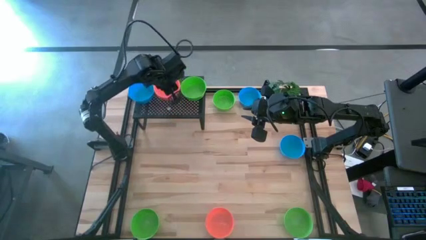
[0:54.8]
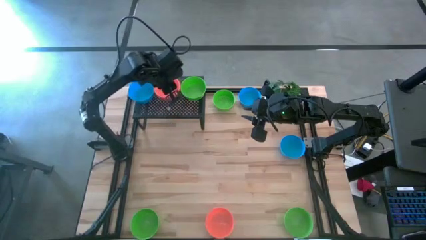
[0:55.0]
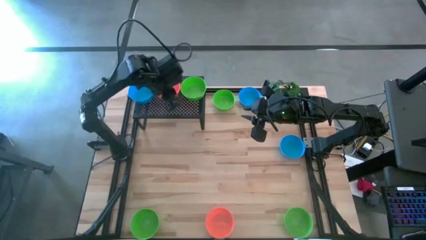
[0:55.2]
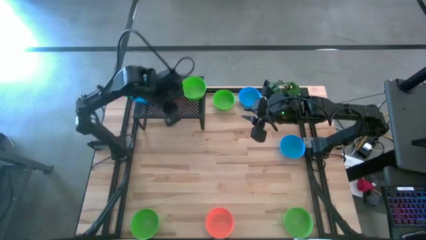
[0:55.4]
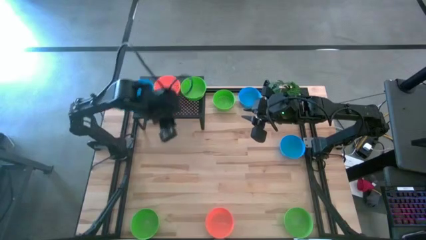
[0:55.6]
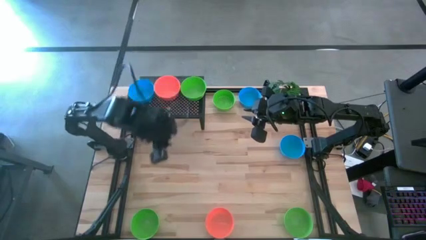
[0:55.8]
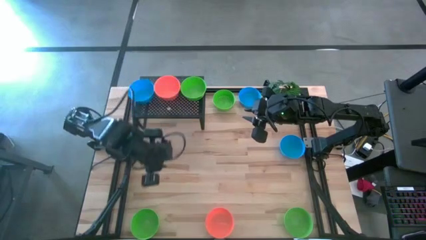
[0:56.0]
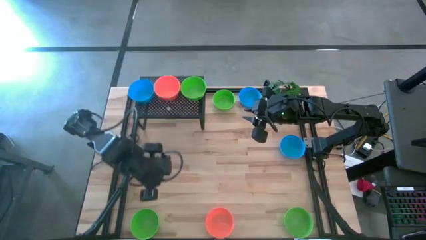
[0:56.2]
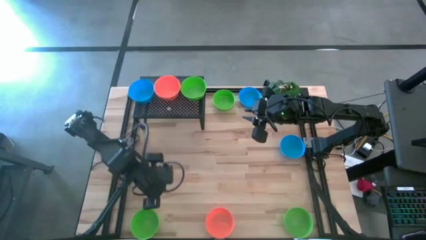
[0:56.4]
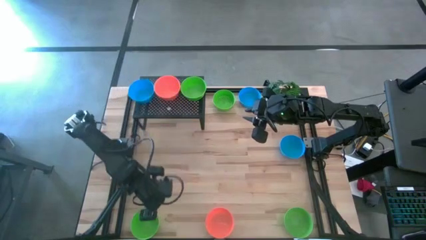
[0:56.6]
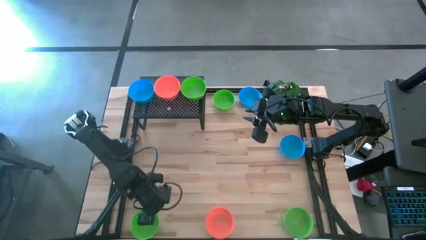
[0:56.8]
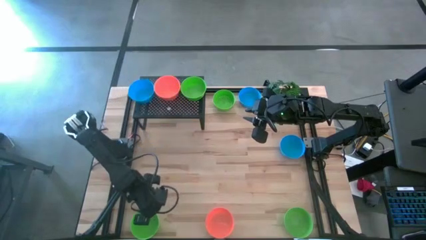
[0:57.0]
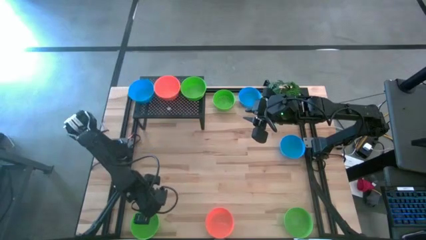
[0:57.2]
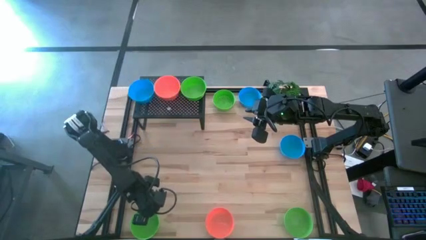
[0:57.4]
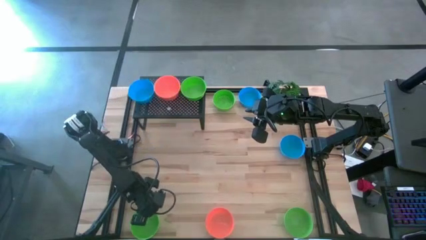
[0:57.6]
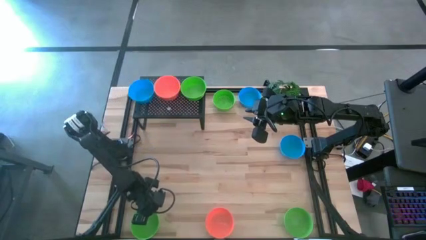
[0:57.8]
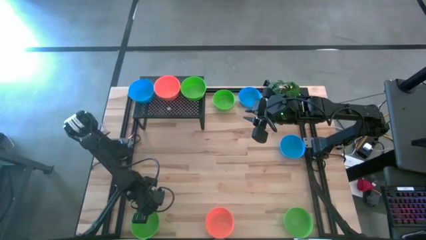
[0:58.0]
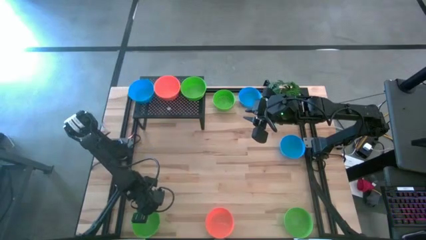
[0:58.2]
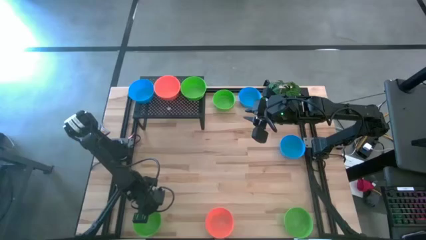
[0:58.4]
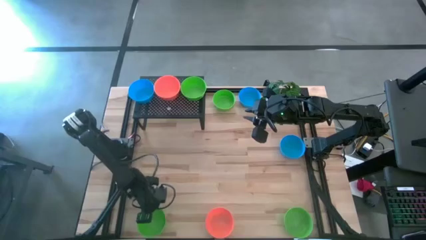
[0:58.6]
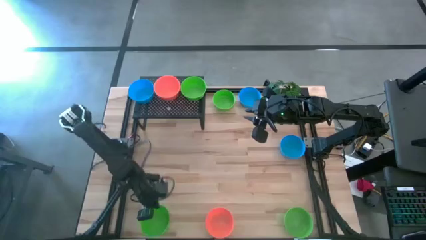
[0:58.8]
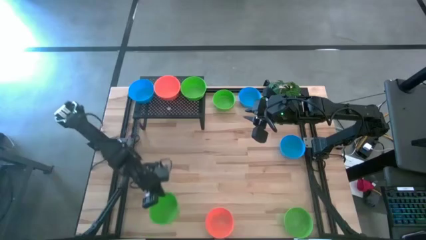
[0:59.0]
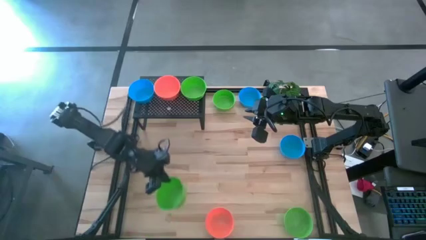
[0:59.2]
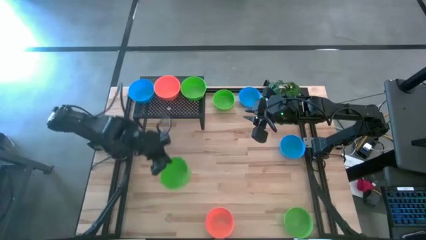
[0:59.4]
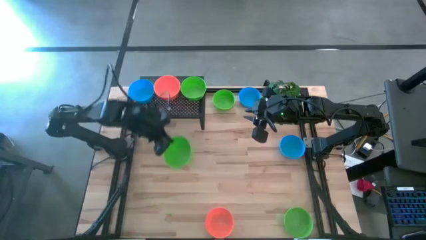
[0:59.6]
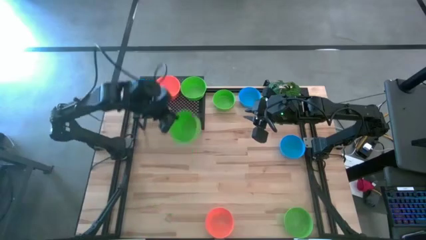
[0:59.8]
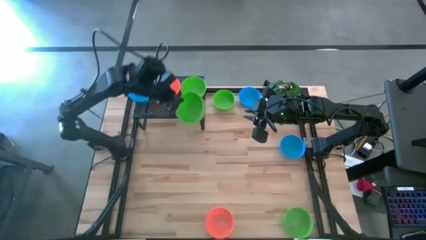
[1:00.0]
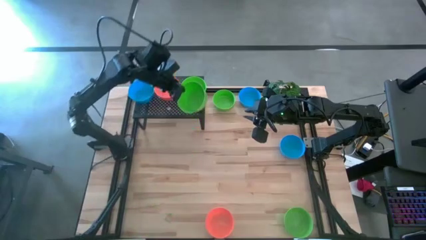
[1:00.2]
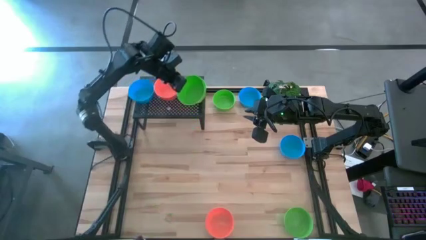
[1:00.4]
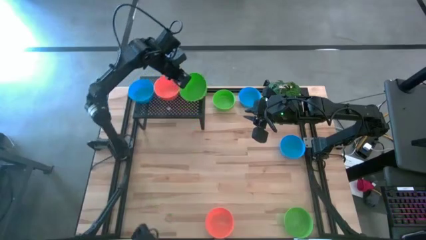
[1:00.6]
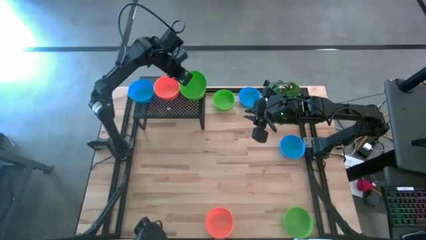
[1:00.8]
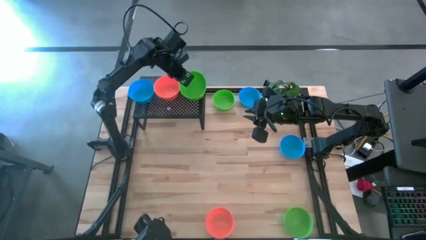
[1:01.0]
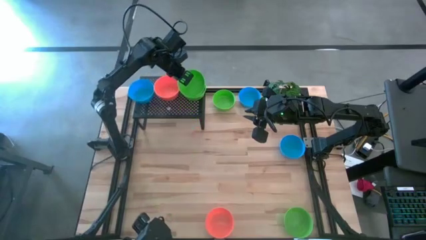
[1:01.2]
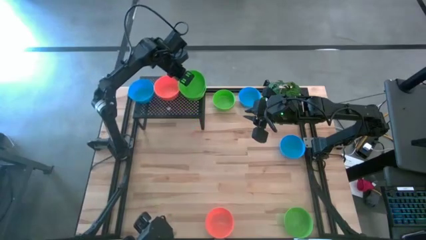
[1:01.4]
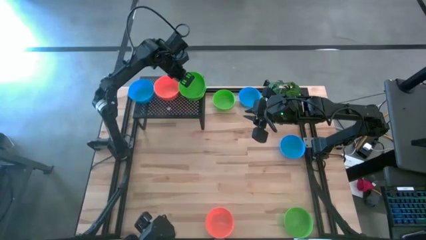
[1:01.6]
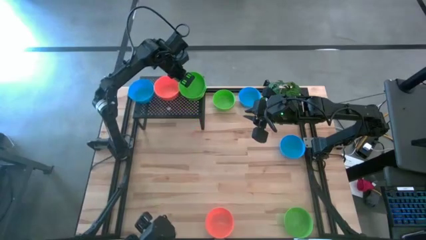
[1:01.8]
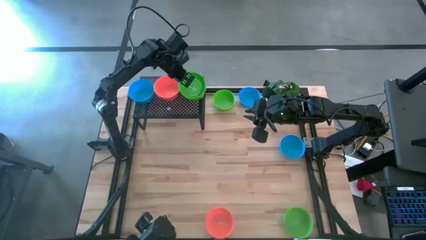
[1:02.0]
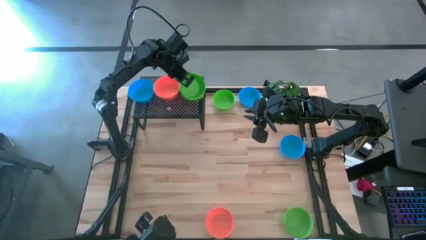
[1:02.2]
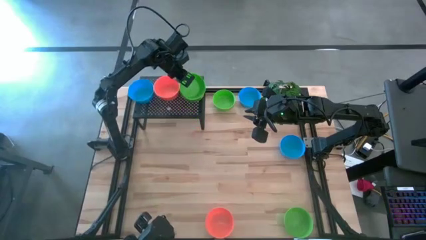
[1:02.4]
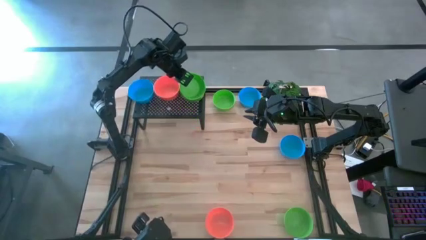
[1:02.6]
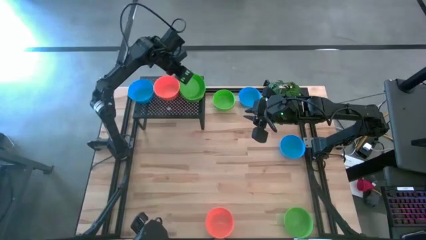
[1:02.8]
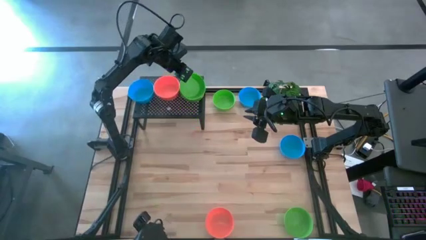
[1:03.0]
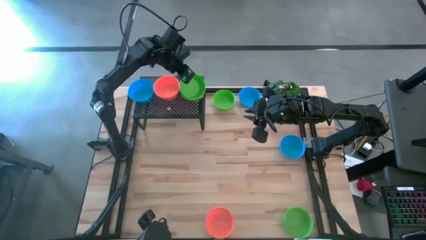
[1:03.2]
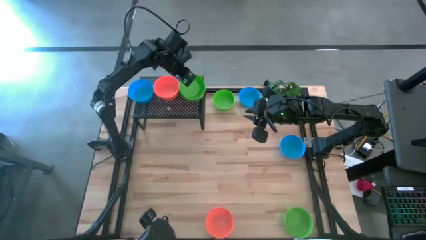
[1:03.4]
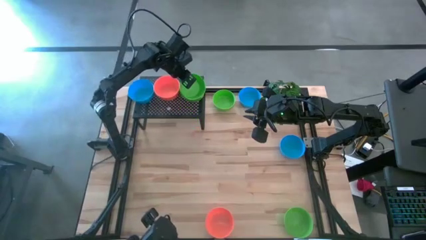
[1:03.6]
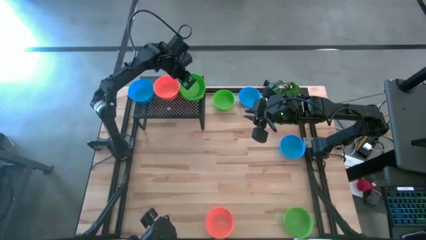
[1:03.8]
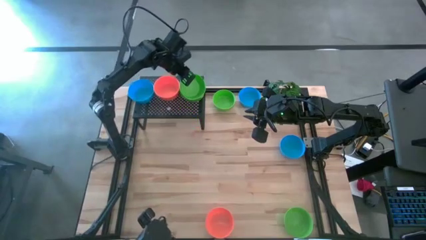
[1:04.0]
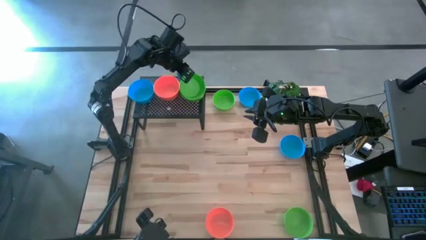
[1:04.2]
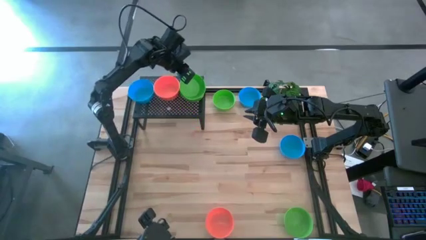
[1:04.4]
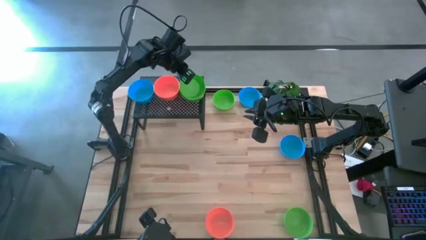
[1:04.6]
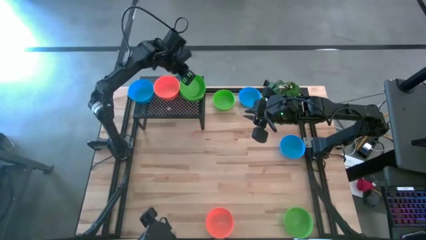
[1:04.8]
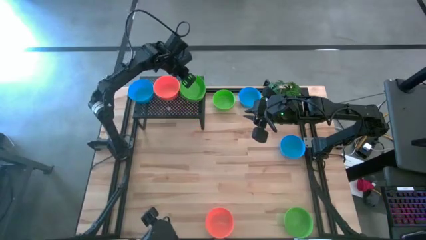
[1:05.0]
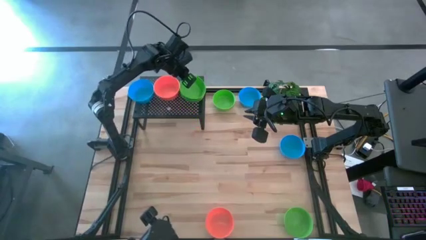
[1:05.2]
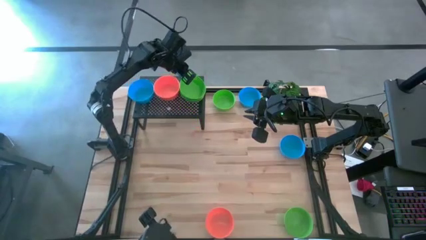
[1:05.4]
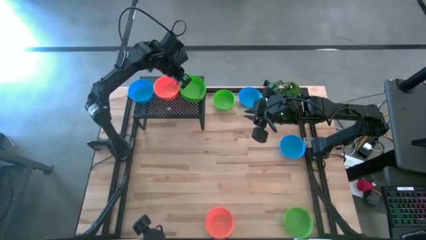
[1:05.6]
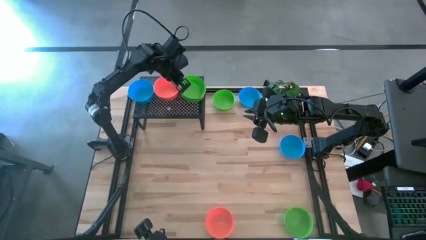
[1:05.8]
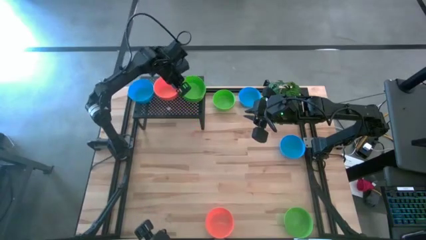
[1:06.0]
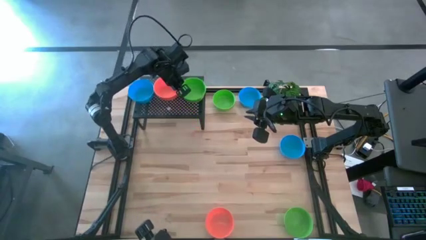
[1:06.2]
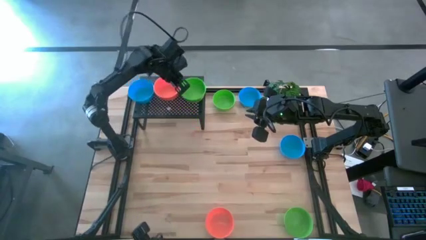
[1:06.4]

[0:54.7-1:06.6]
Task: Pick & Place Mini bowls
Stack the green bowl on top of the green bowl on the shelf
